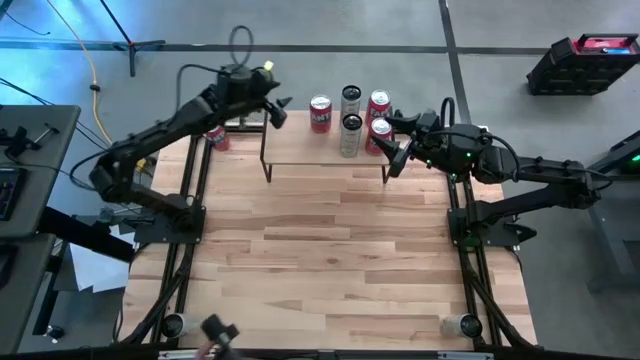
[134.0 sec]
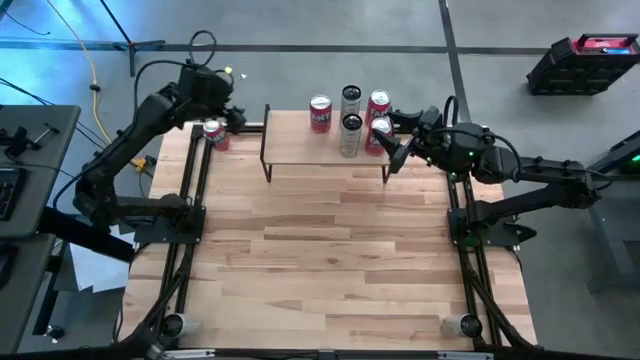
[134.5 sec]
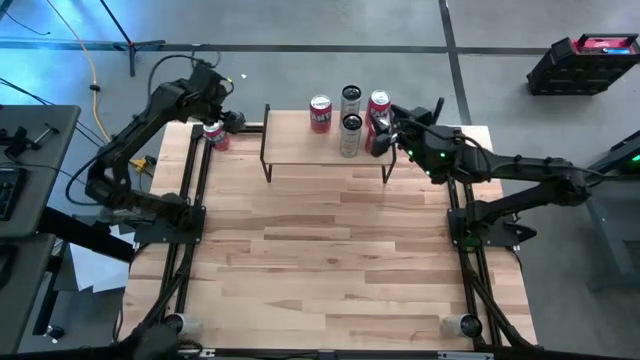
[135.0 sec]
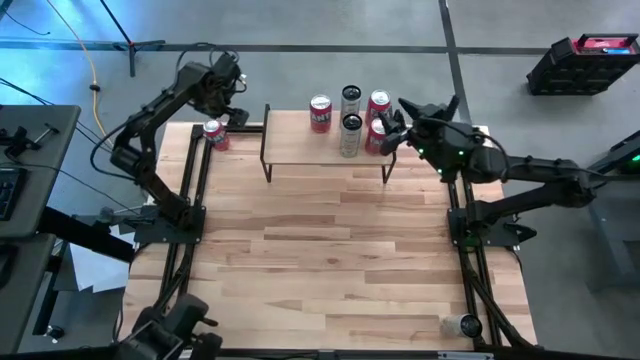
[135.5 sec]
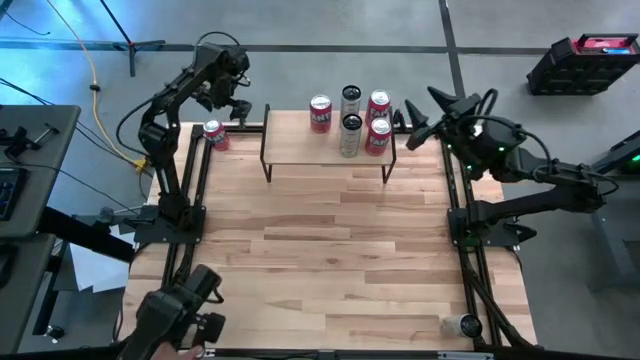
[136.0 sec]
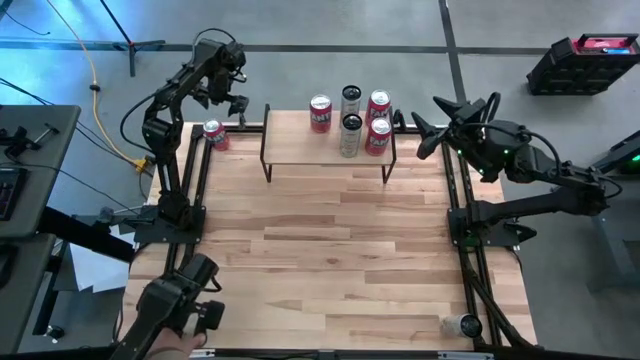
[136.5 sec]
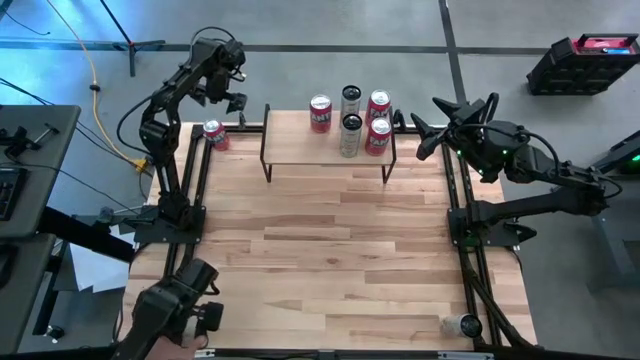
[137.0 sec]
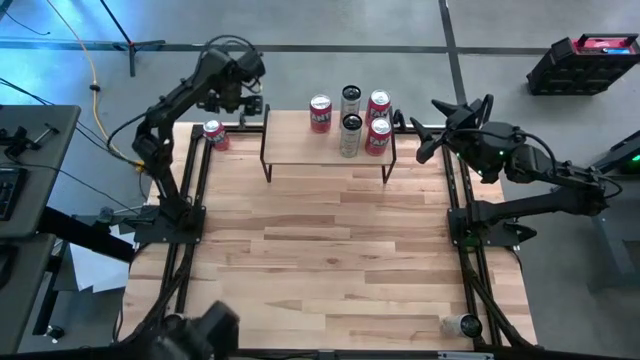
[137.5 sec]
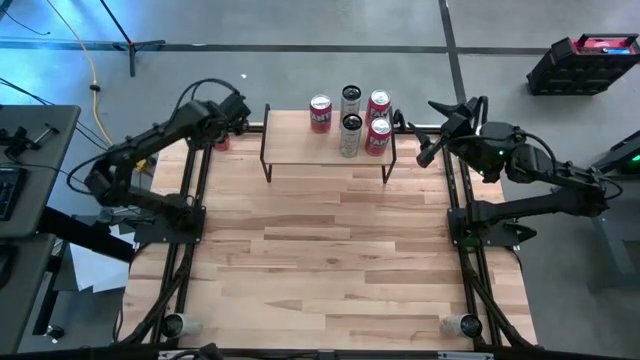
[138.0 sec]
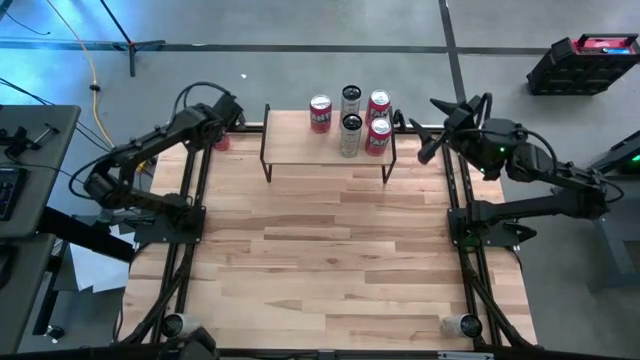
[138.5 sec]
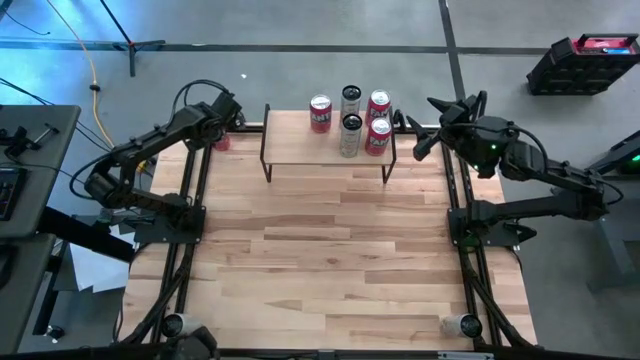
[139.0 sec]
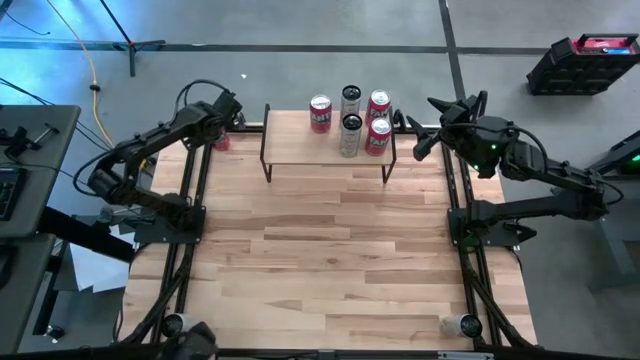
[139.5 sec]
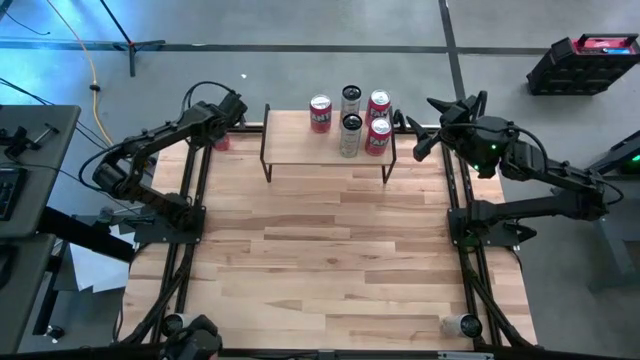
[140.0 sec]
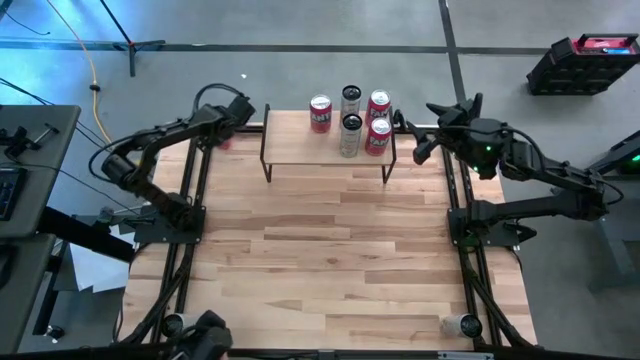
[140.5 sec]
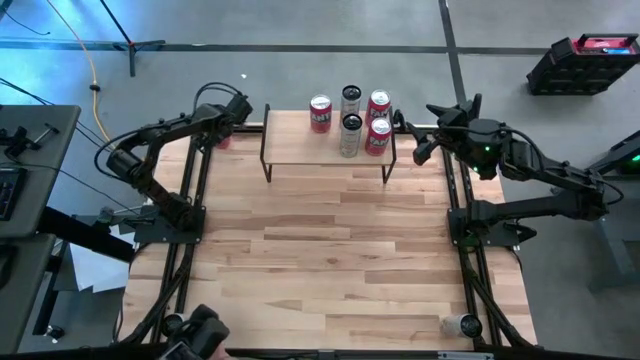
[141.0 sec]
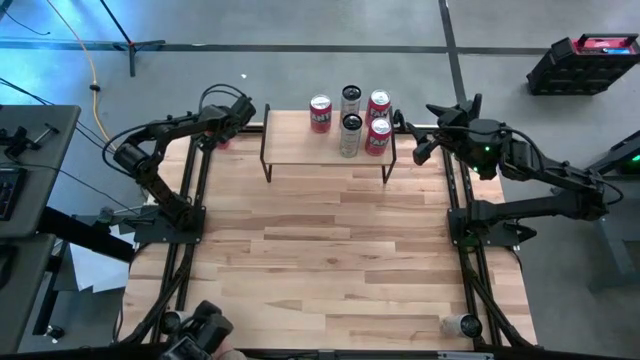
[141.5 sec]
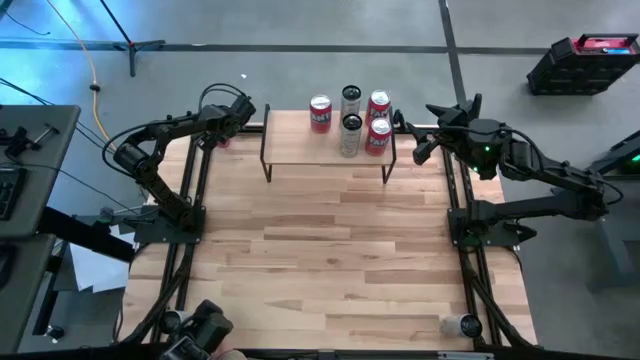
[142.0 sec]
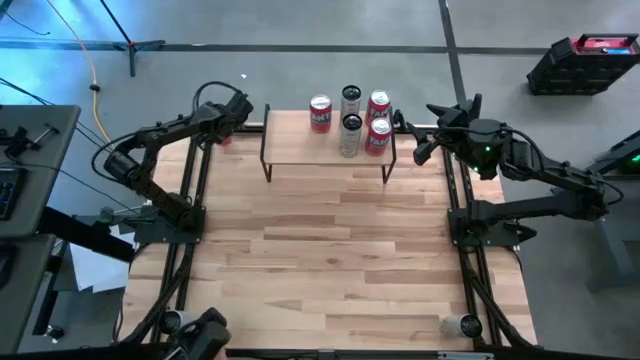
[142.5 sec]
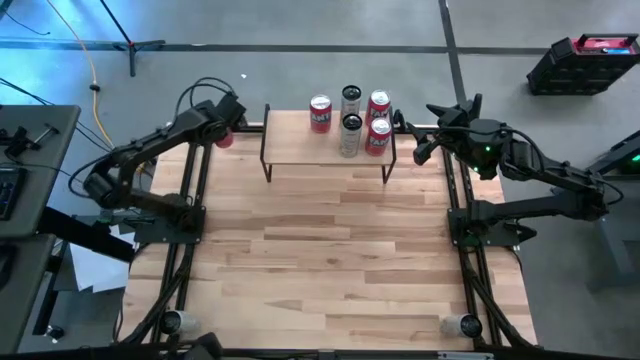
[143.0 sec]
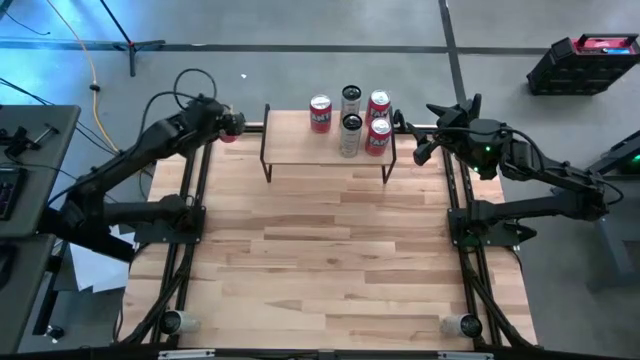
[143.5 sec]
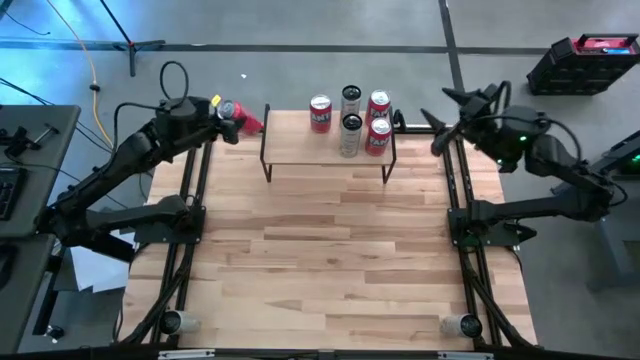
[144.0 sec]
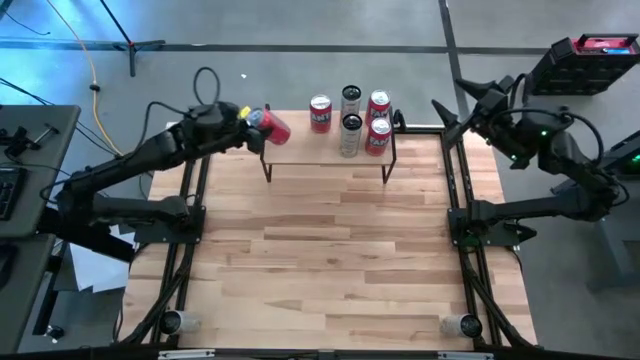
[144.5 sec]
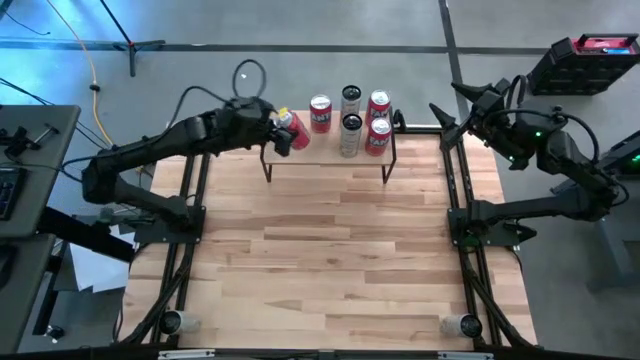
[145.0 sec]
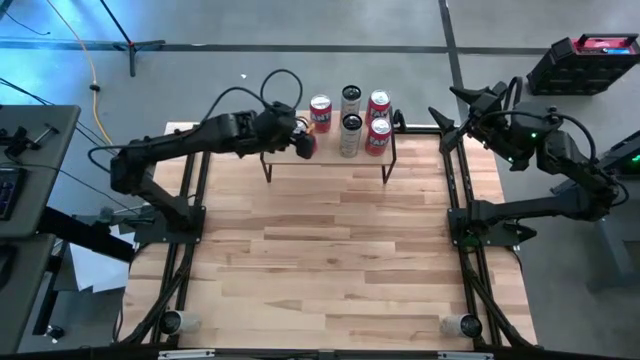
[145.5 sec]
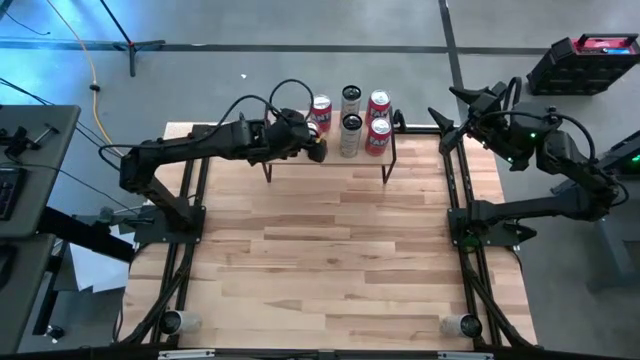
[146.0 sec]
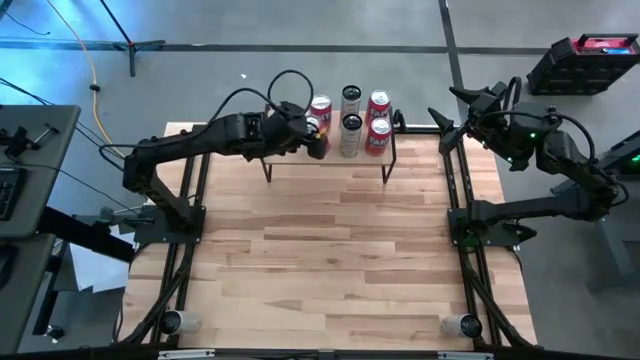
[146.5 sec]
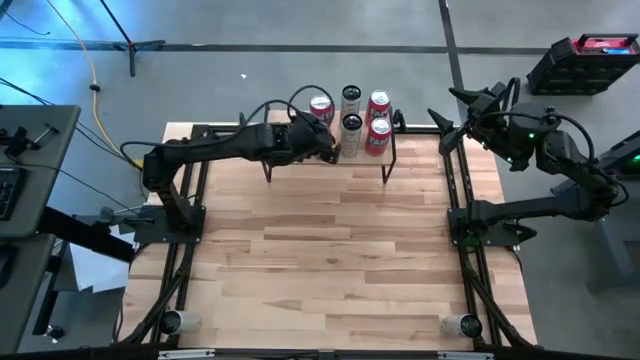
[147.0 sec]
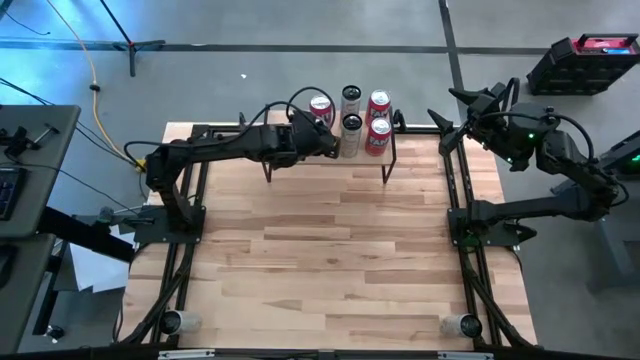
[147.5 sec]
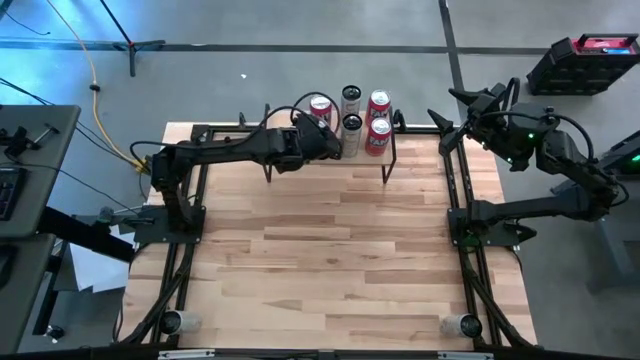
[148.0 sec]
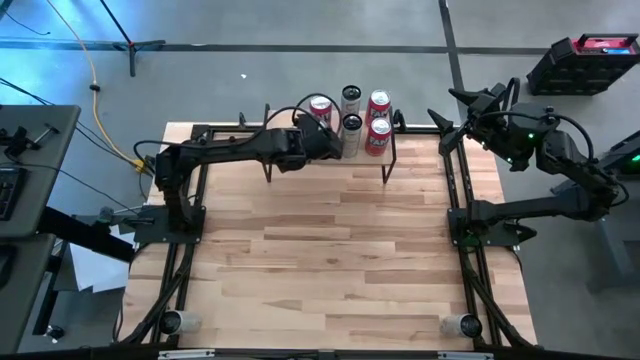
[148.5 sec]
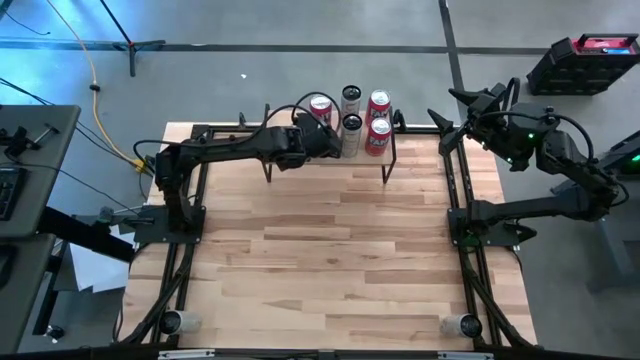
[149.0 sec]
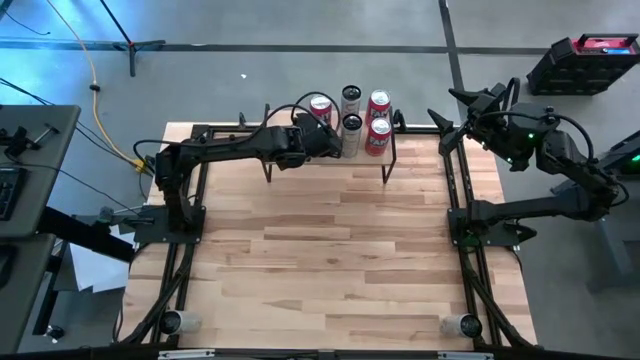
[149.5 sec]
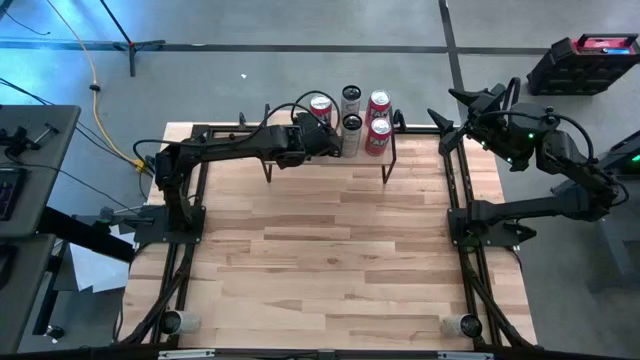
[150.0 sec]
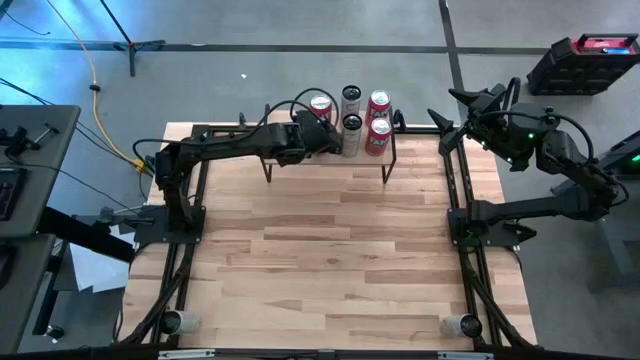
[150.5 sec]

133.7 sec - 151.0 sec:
Task: Place canned beverage on shelf
Put the red soda can aligned with the other red soda can on the shelf

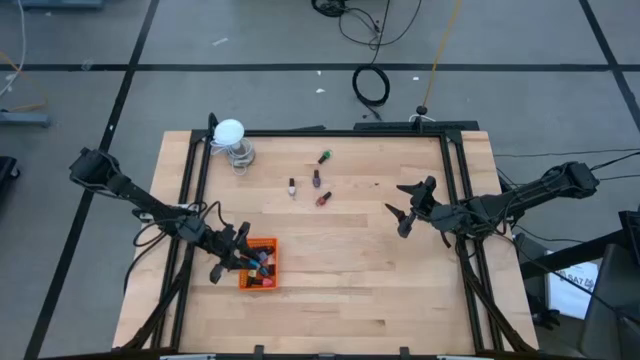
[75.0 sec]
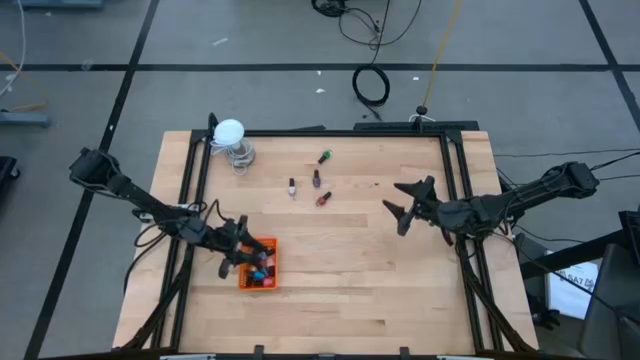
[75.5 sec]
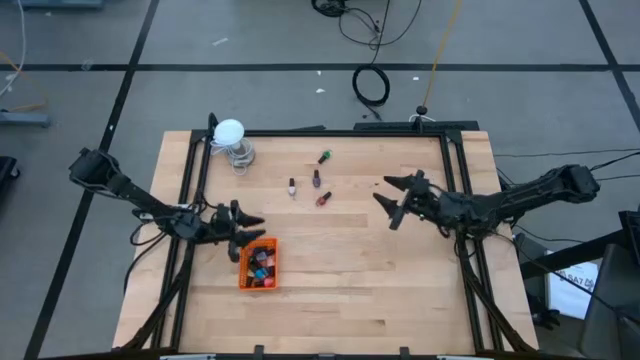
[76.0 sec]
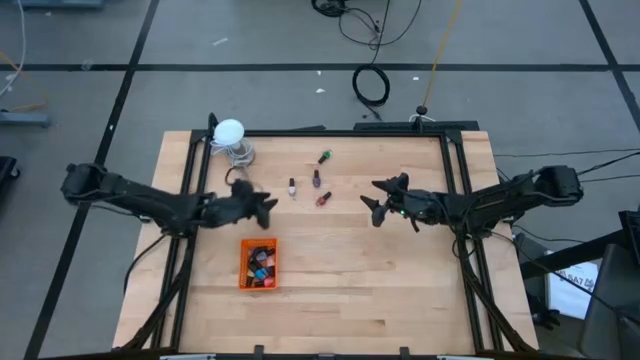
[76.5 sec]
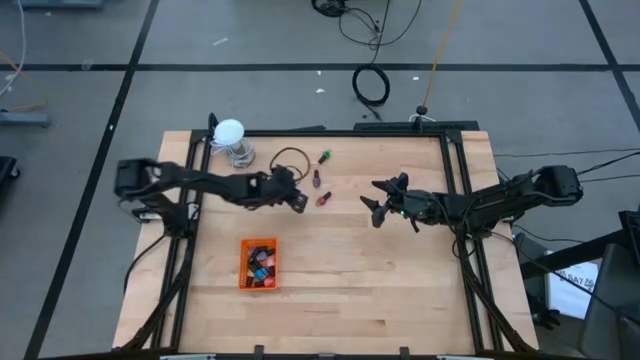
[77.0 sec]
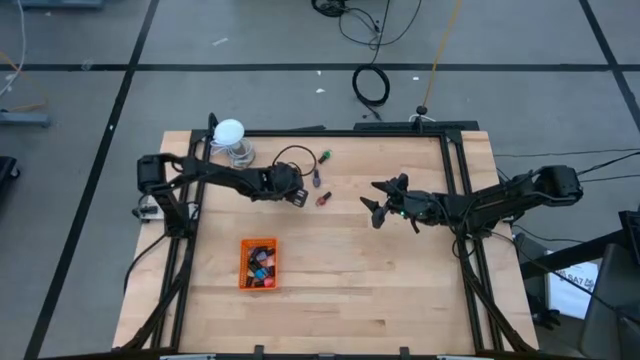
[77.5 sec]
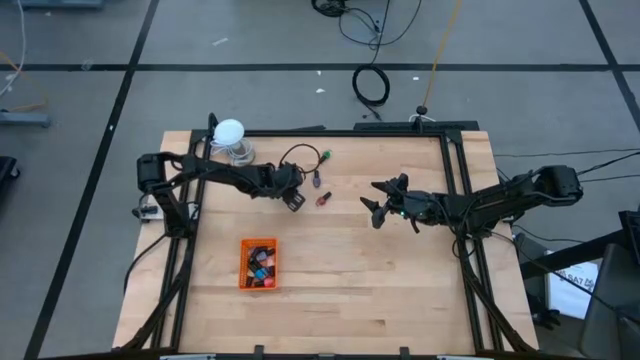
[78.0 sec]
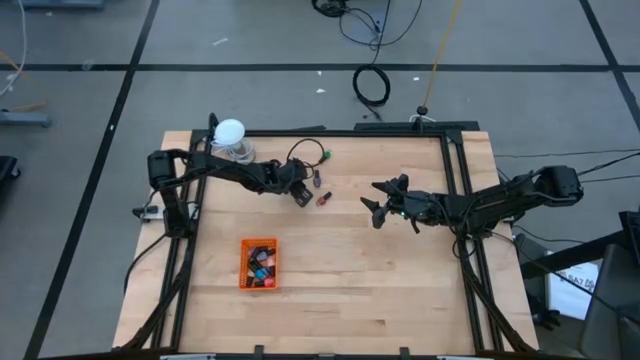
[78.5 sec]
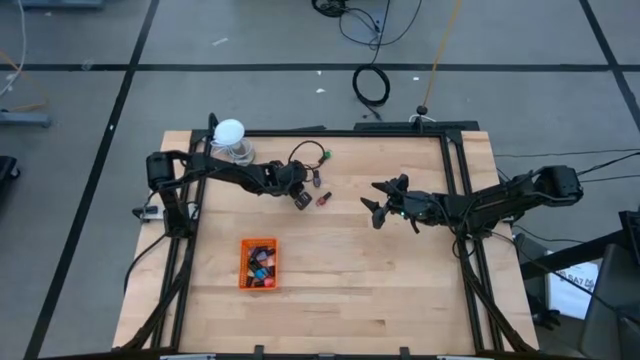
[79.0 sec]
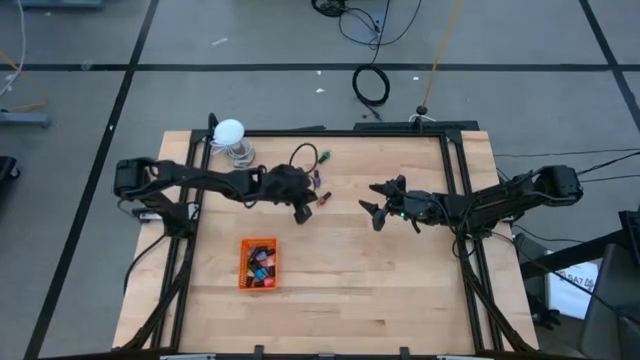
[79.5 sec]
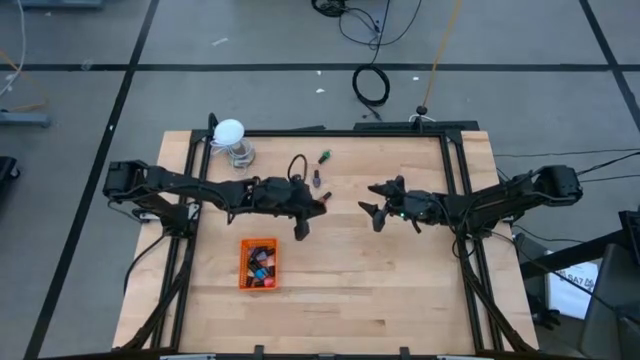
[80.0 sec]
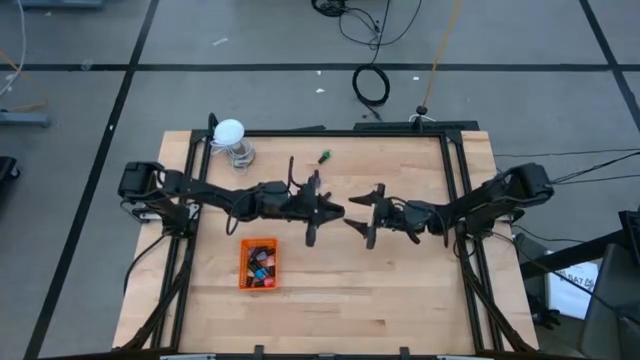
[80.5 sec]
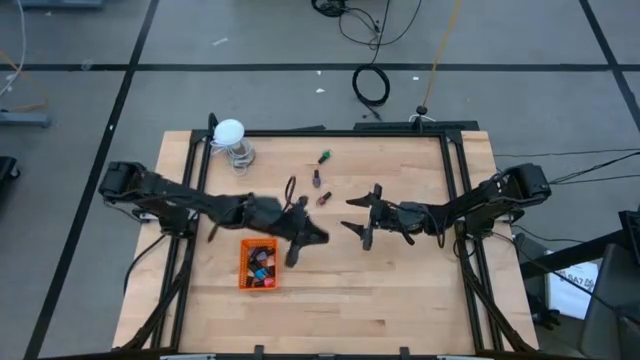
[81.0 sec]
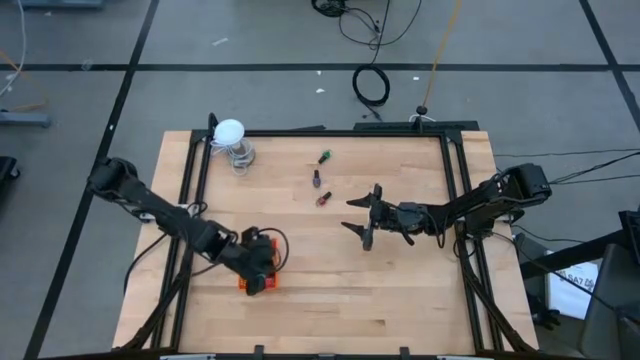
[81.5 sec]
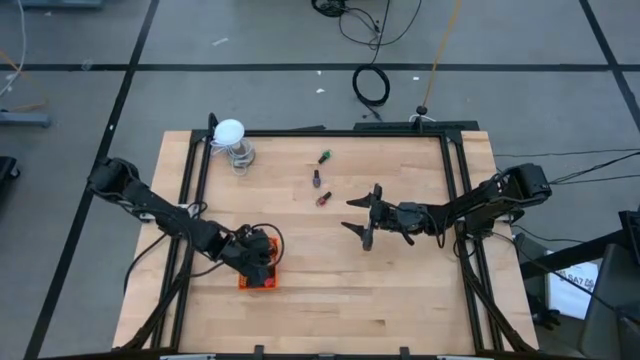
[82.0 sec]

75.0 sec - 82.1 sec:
Task: Pick & Place Nail Polish
Put the white nail color bottle into the orange bin
